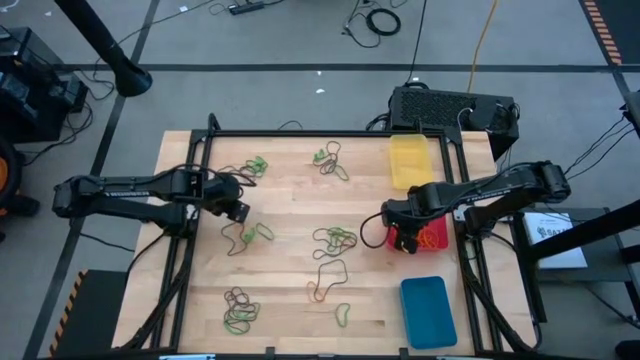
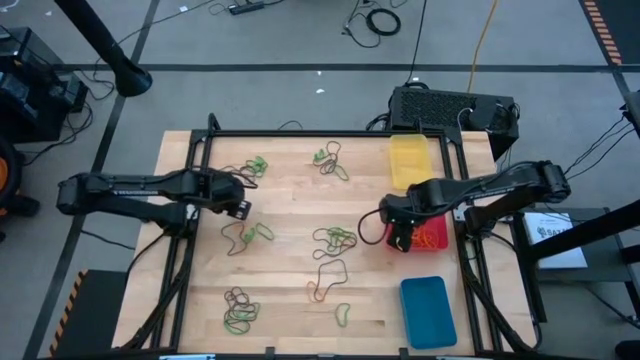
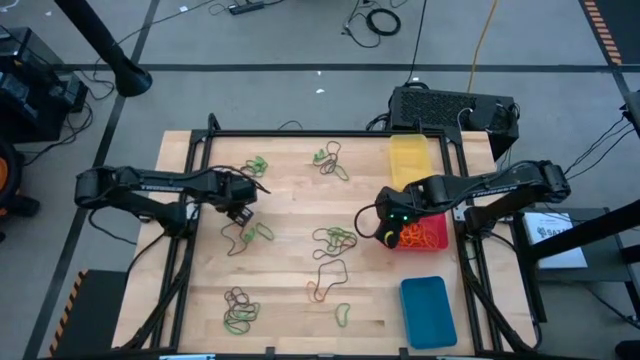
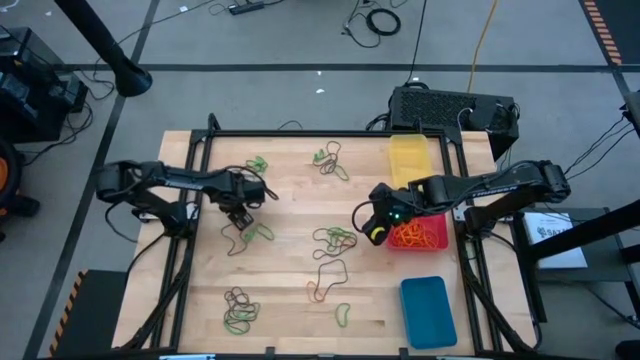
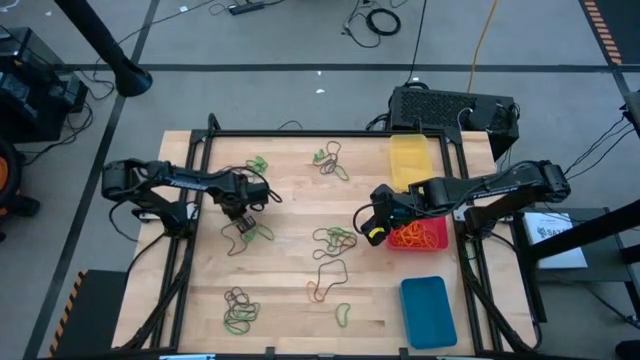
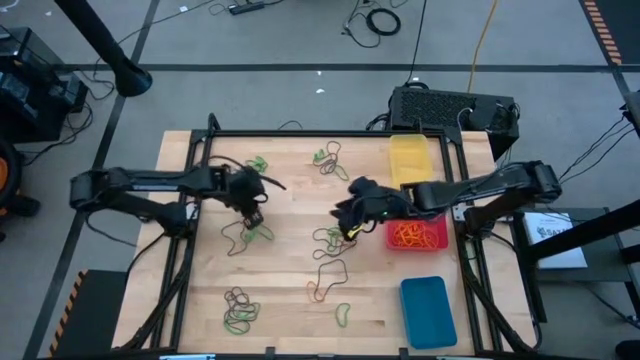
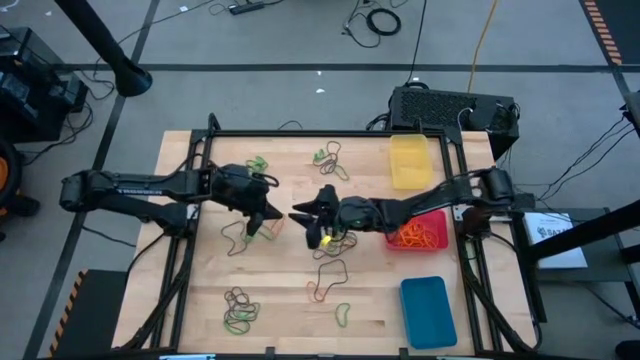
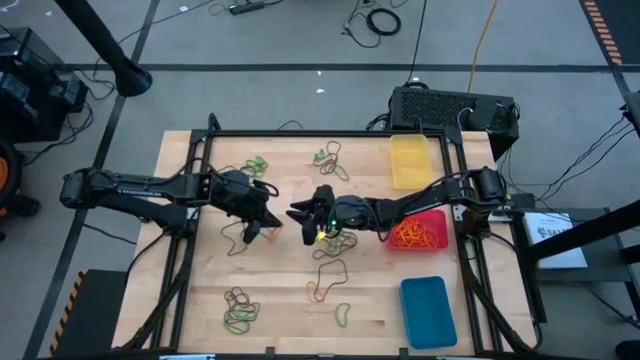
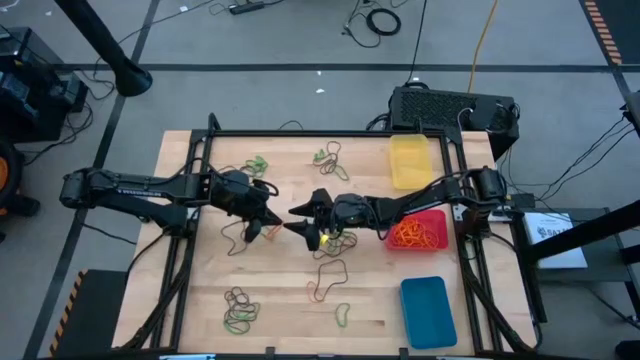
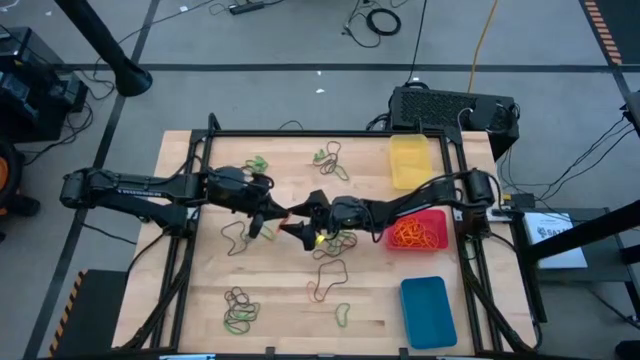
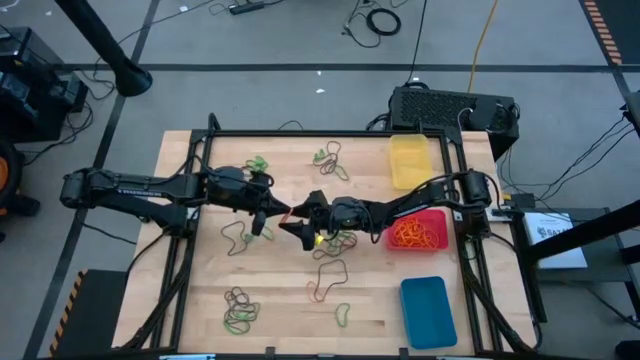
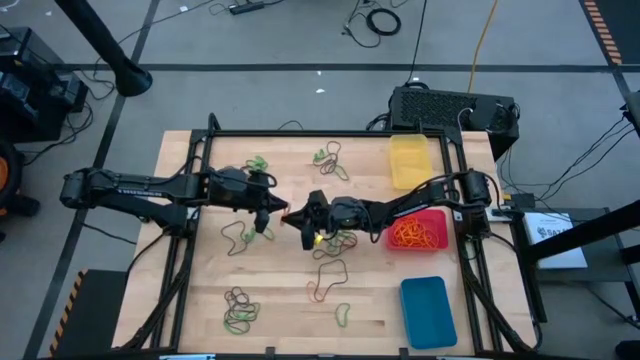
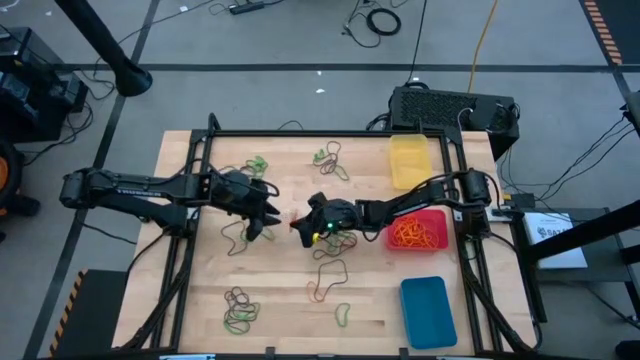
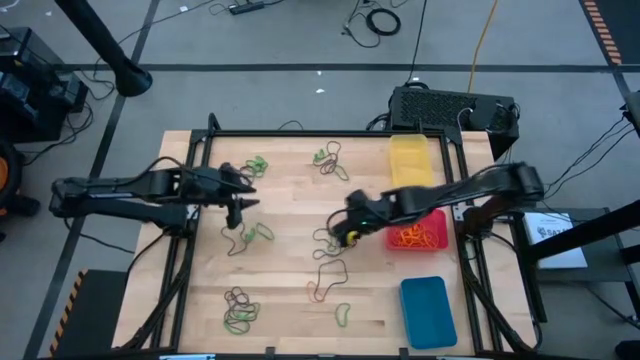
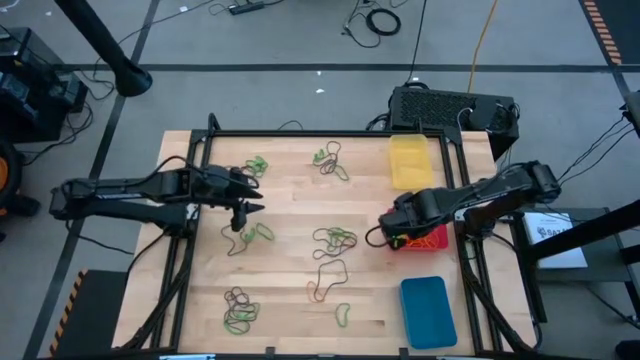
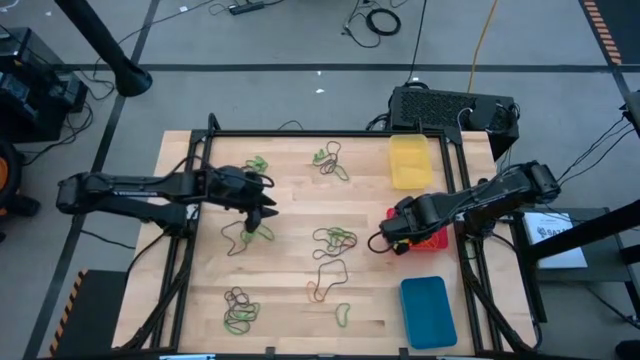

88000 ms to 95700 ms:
Task: Sort rubber bands into baskets
Put the orange rubber band into the red bin

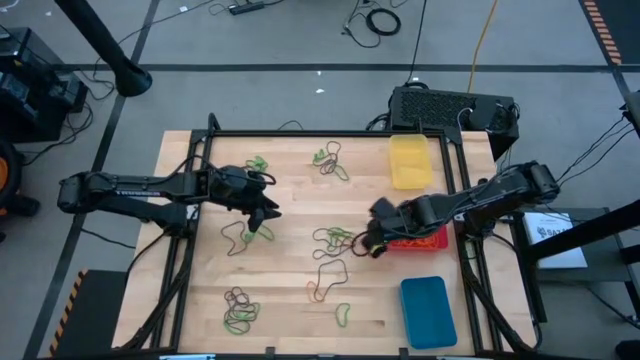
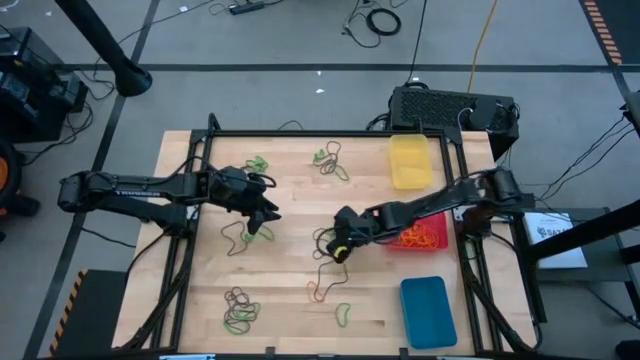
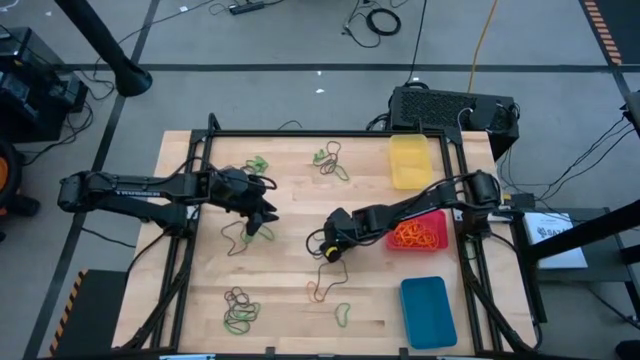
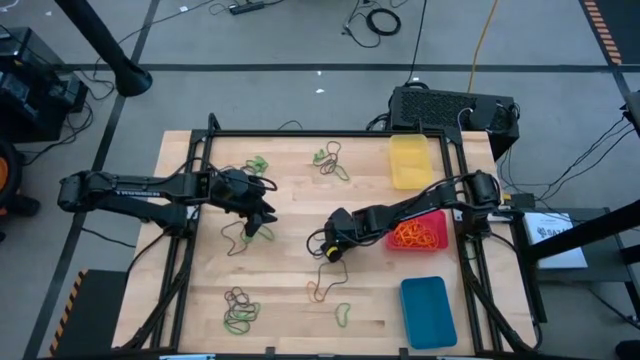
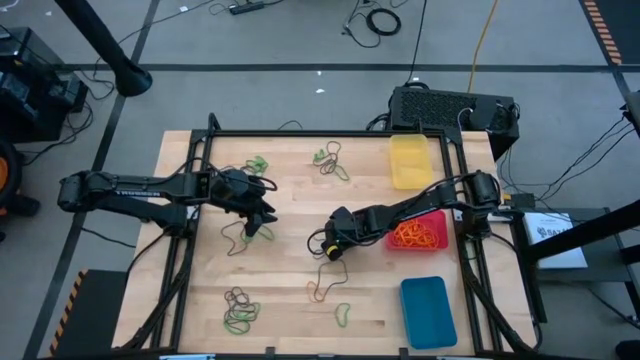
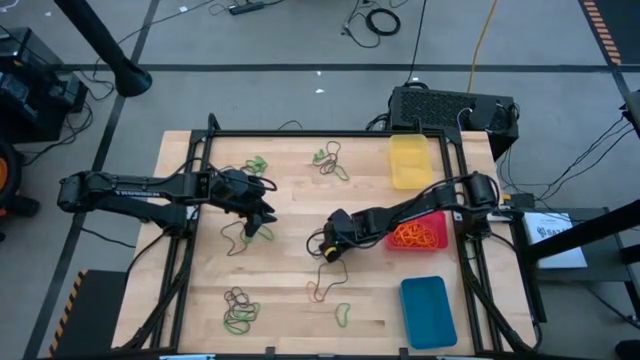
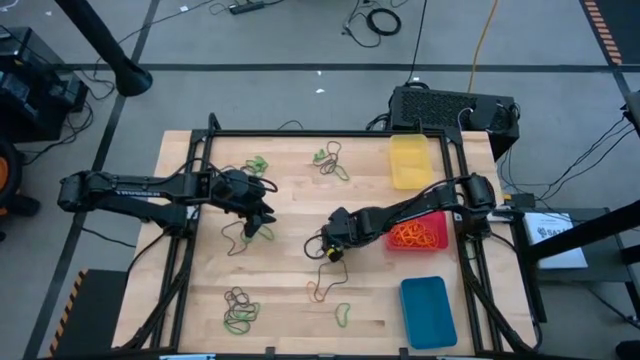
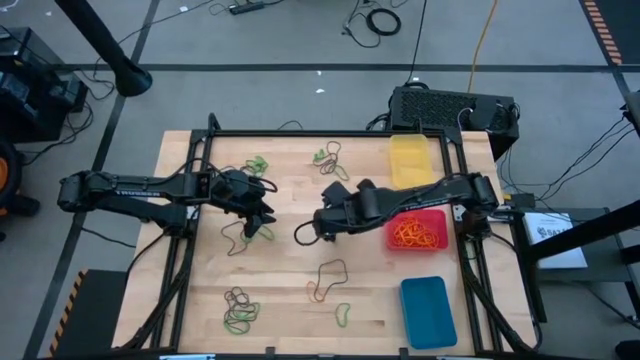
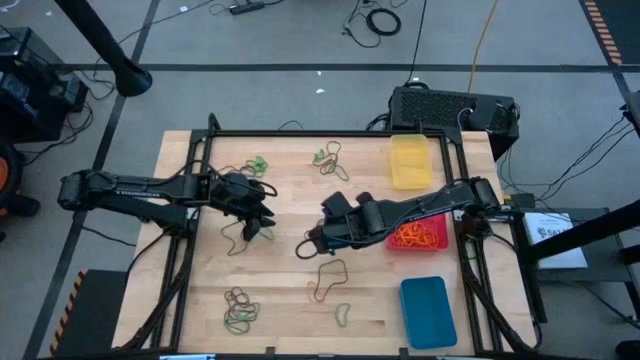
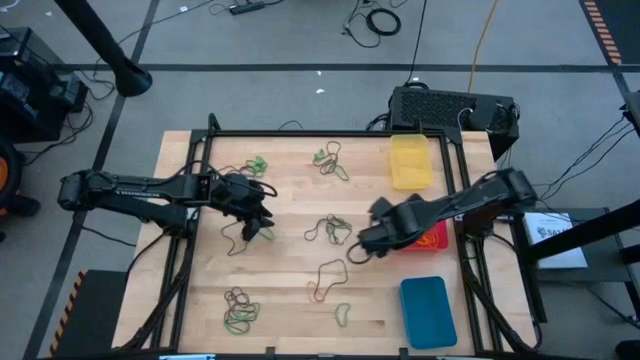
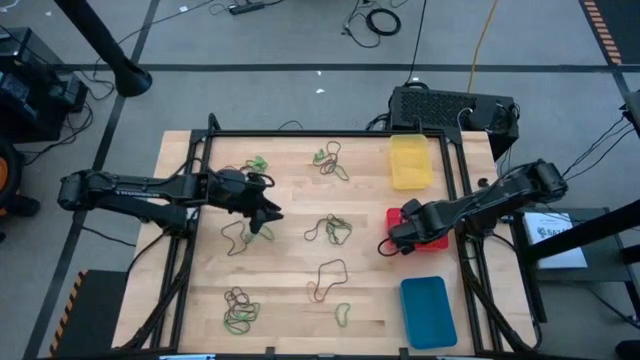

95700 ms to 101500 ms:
Put the orange rubber band into the red bin

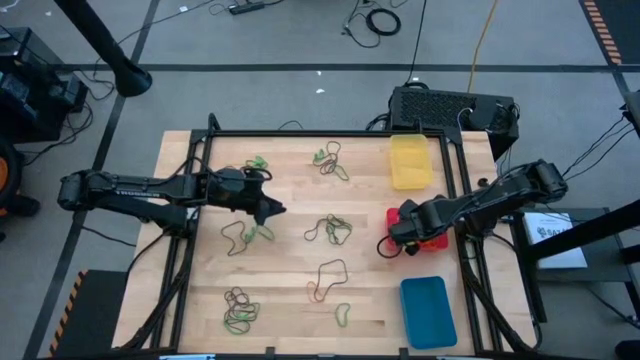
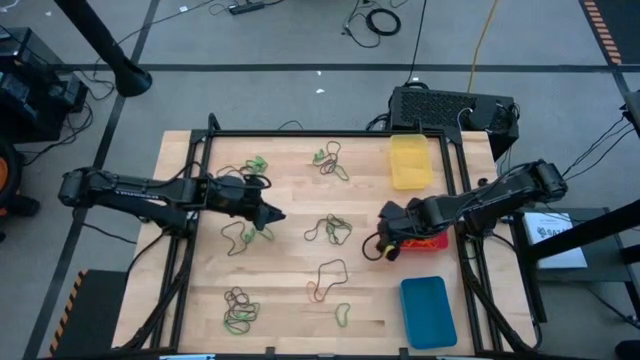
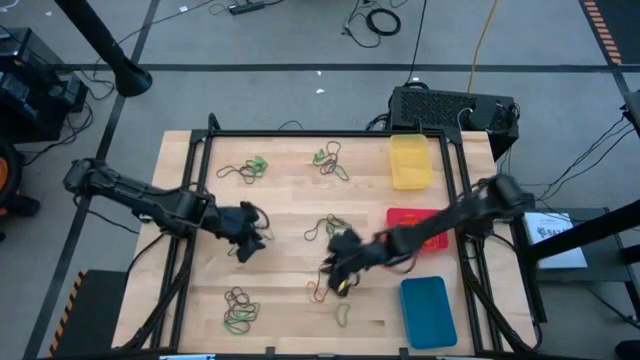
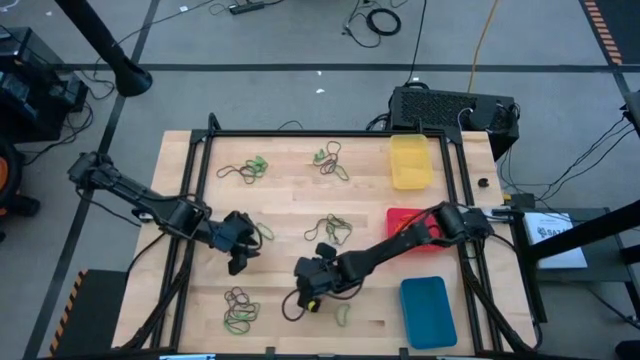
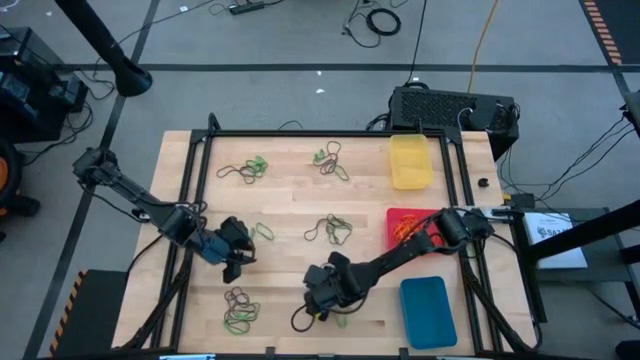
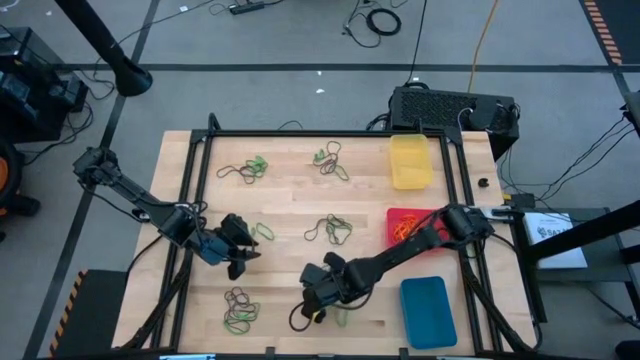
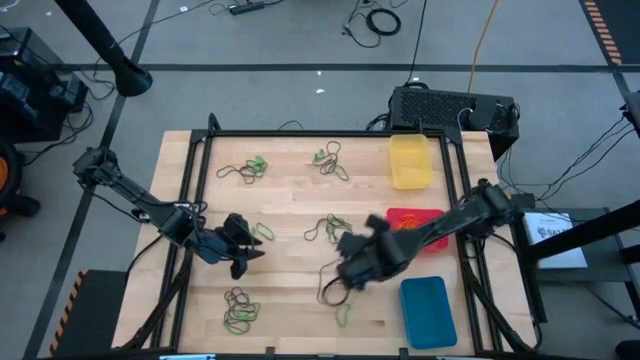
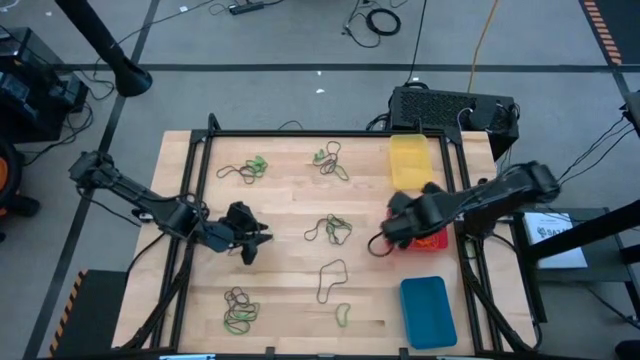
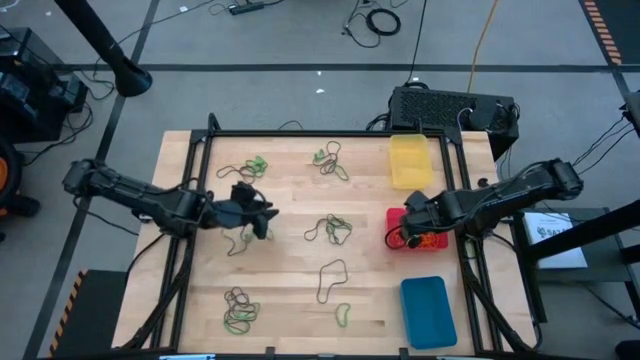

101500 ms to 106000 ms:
Put the orange rubber band into the red bin

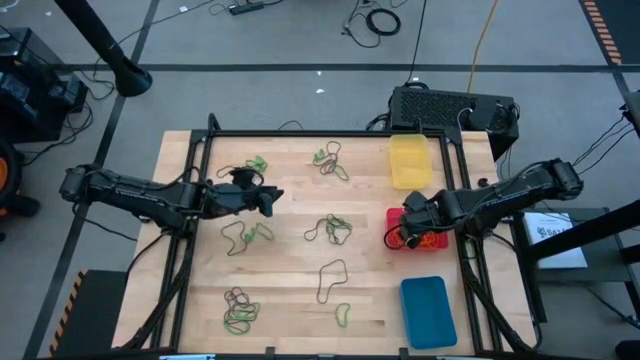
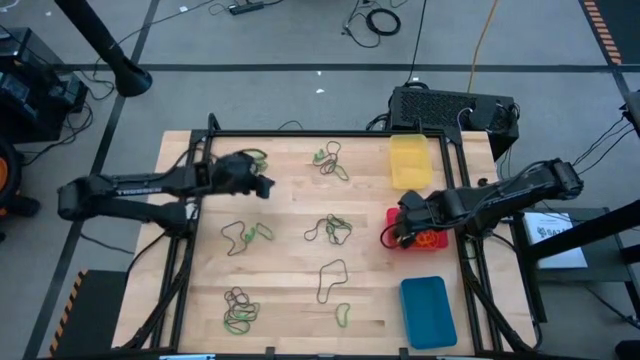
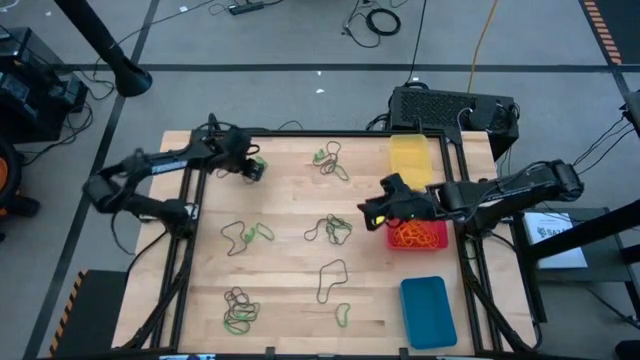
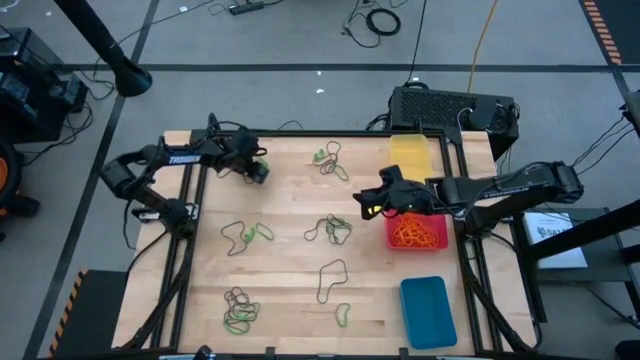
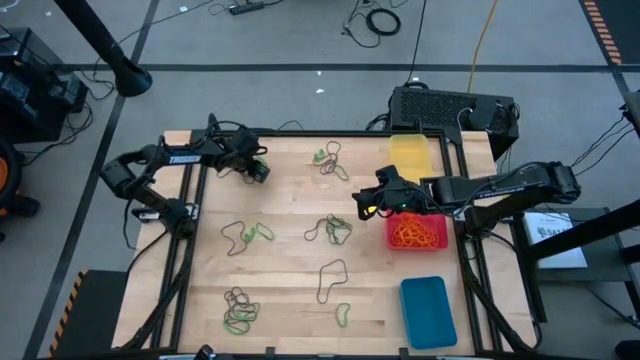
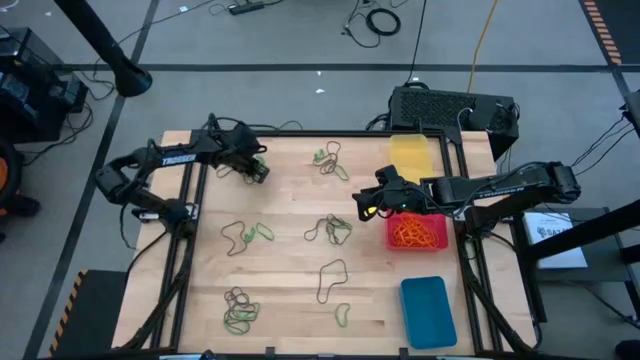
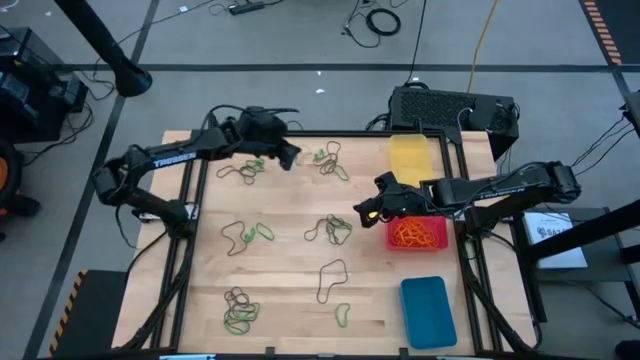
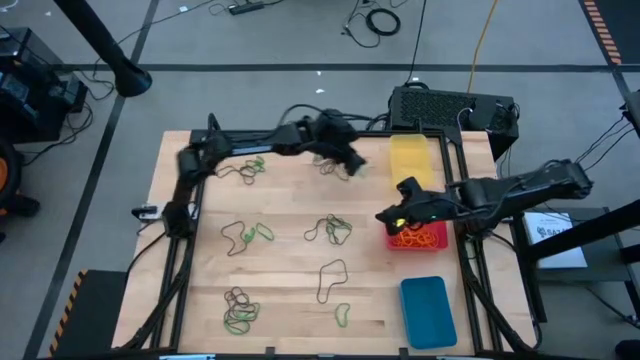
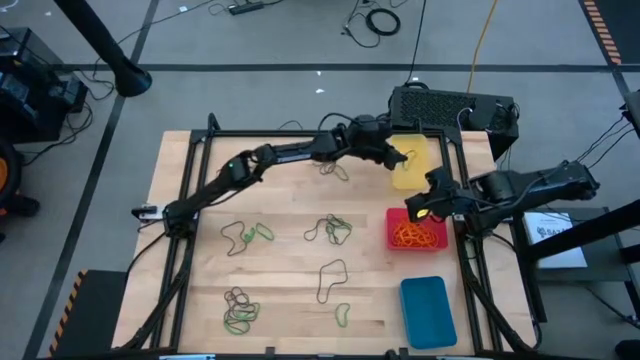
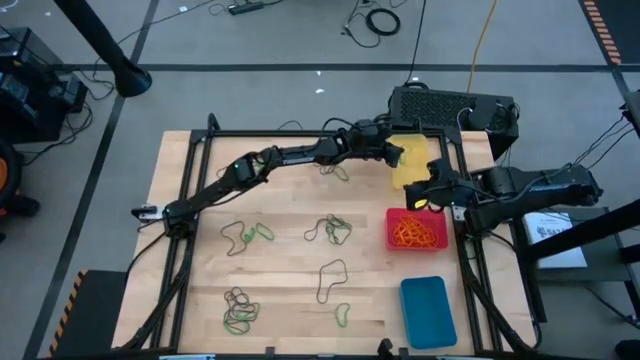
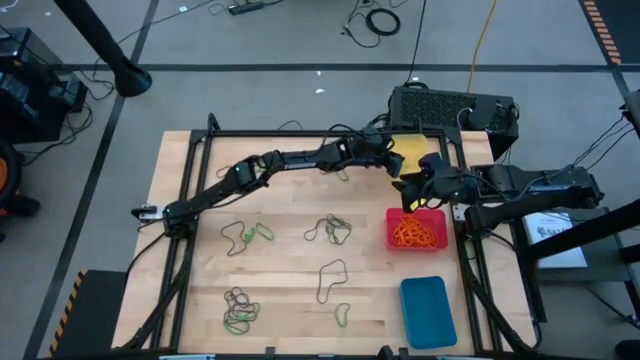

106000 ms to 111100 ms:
Put the green rubber band into the yellow bin
